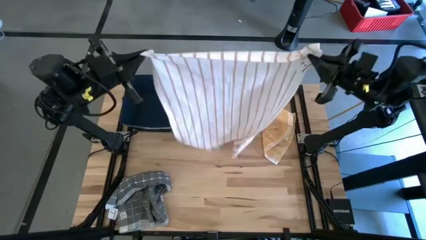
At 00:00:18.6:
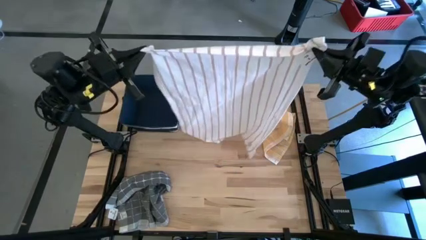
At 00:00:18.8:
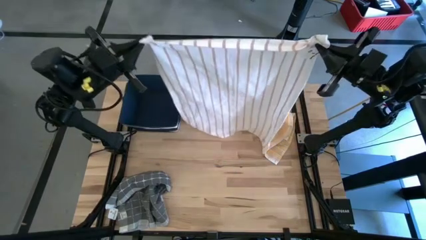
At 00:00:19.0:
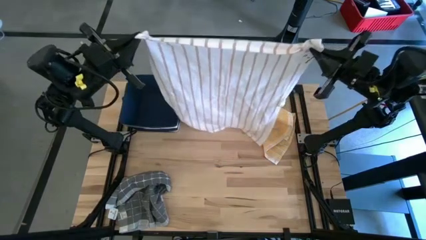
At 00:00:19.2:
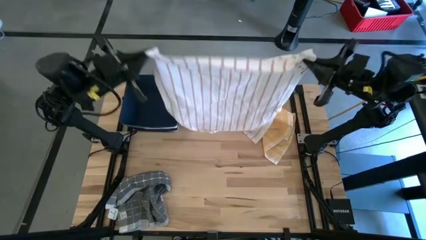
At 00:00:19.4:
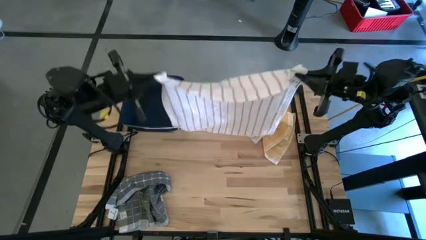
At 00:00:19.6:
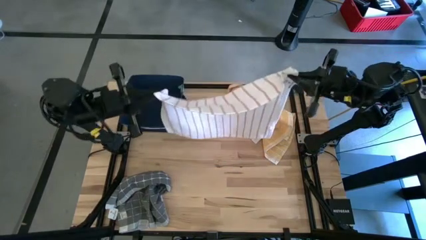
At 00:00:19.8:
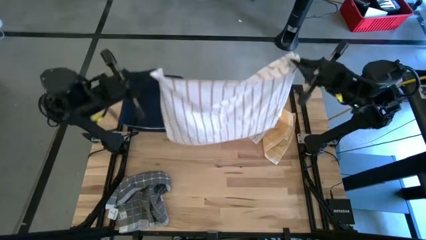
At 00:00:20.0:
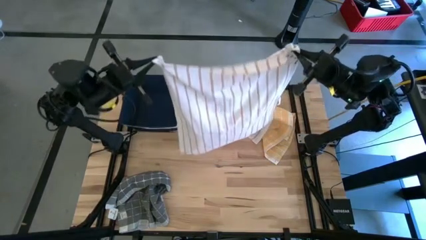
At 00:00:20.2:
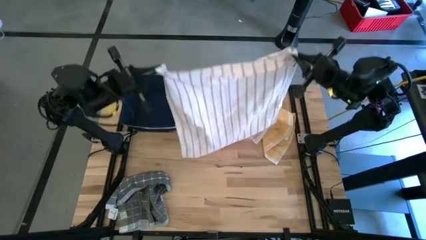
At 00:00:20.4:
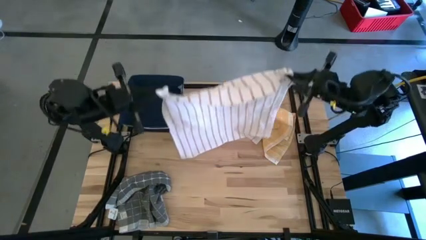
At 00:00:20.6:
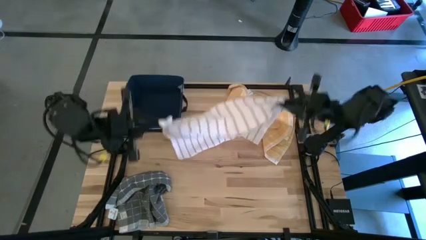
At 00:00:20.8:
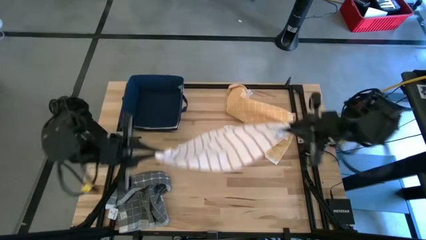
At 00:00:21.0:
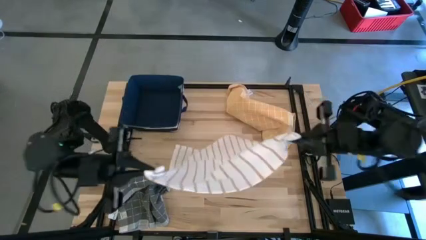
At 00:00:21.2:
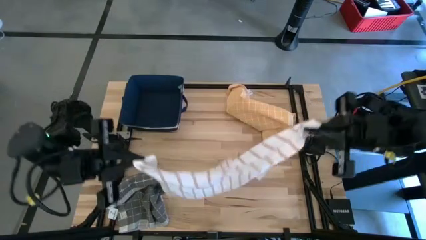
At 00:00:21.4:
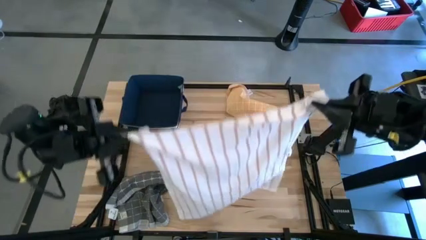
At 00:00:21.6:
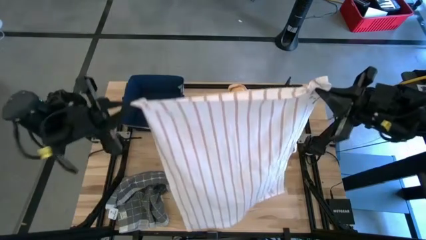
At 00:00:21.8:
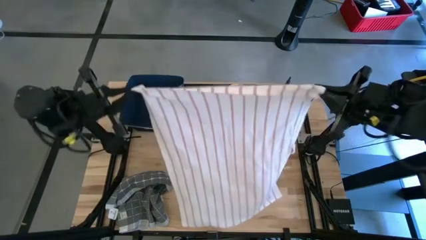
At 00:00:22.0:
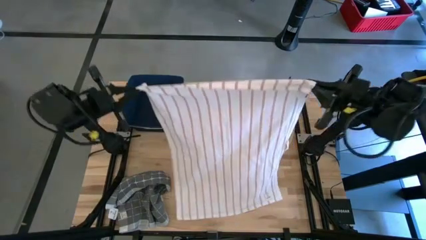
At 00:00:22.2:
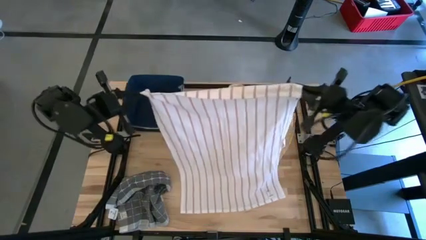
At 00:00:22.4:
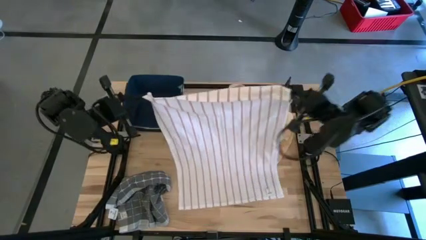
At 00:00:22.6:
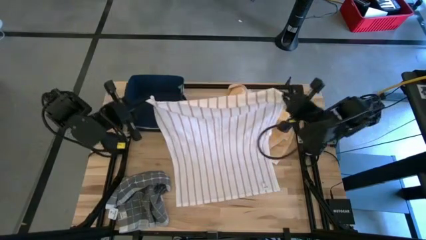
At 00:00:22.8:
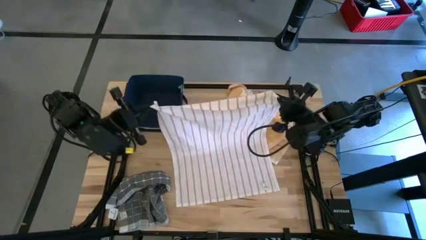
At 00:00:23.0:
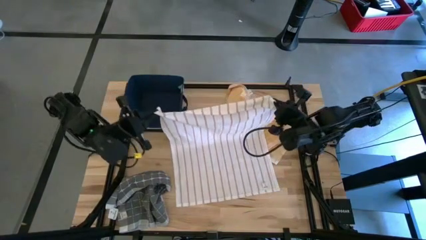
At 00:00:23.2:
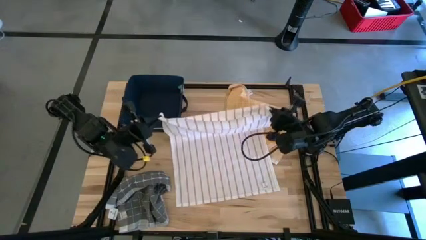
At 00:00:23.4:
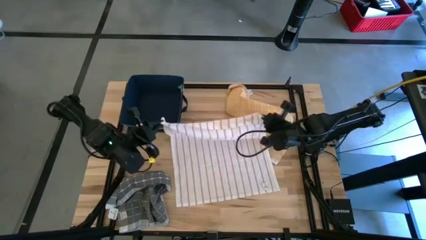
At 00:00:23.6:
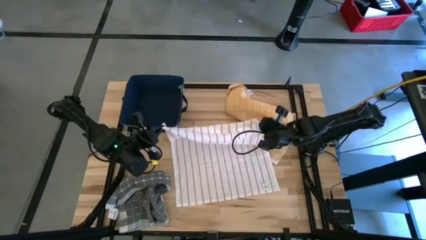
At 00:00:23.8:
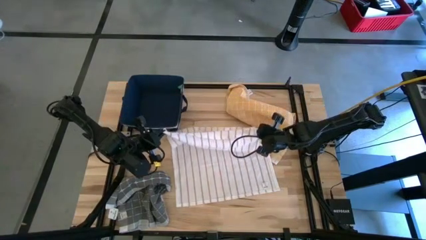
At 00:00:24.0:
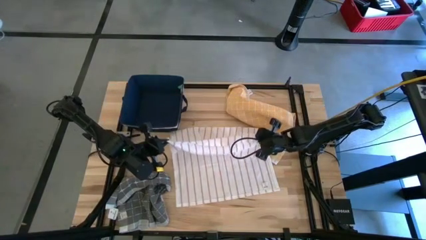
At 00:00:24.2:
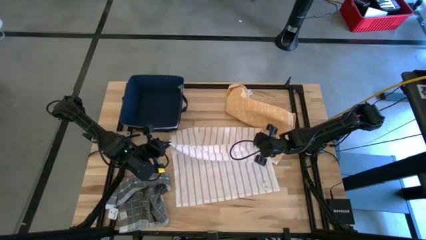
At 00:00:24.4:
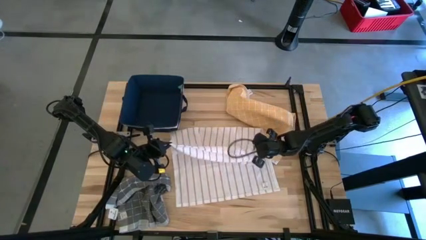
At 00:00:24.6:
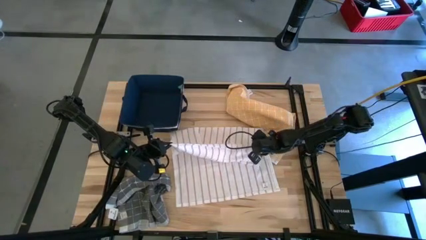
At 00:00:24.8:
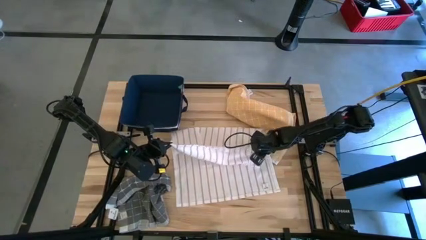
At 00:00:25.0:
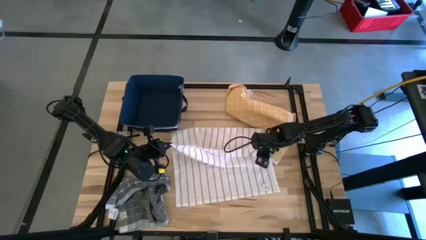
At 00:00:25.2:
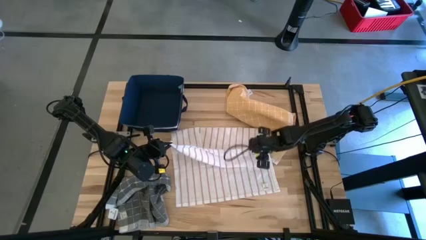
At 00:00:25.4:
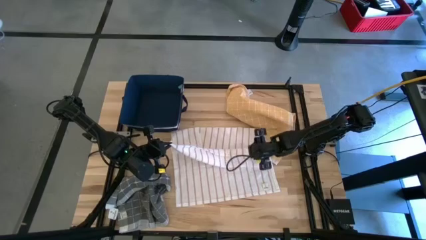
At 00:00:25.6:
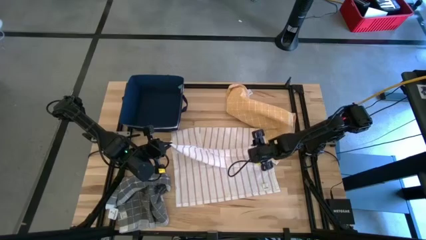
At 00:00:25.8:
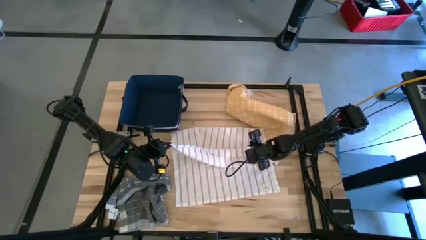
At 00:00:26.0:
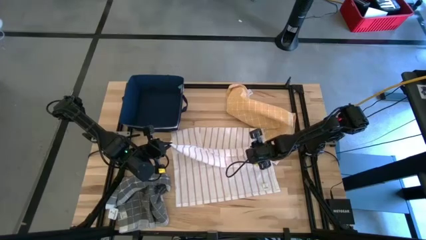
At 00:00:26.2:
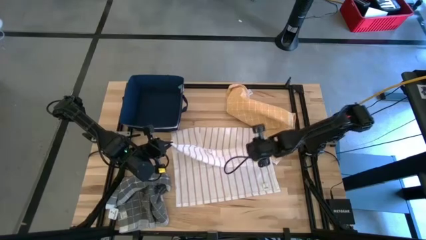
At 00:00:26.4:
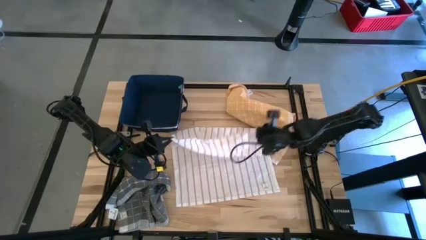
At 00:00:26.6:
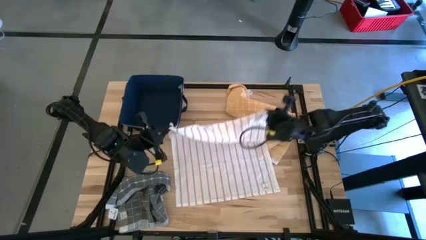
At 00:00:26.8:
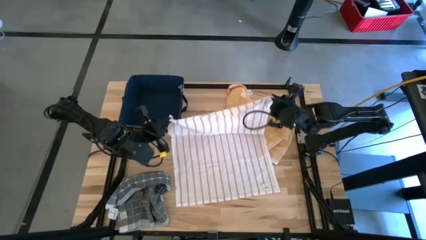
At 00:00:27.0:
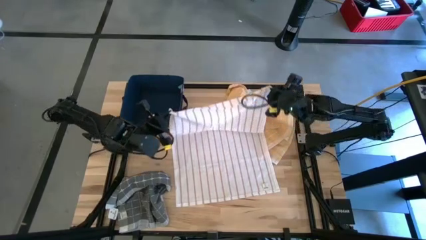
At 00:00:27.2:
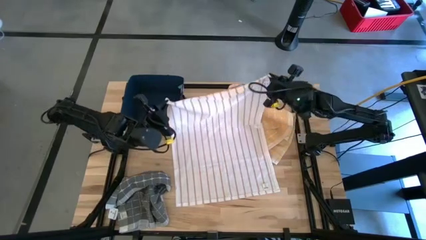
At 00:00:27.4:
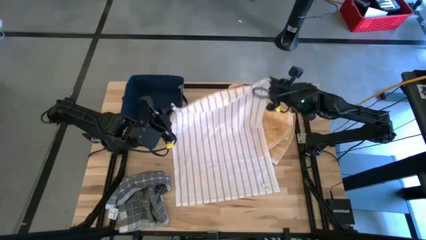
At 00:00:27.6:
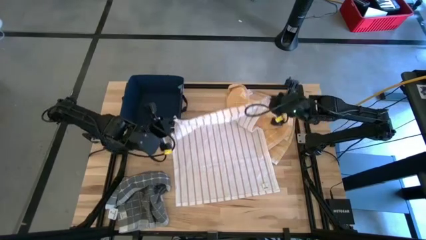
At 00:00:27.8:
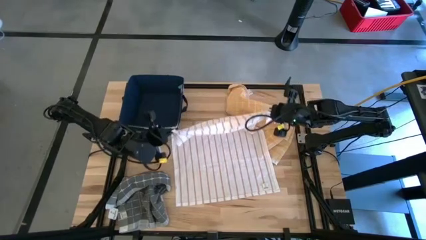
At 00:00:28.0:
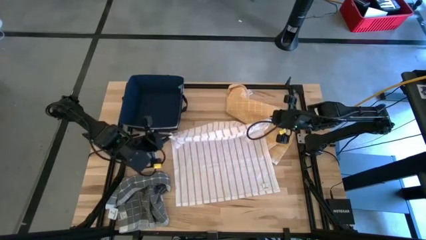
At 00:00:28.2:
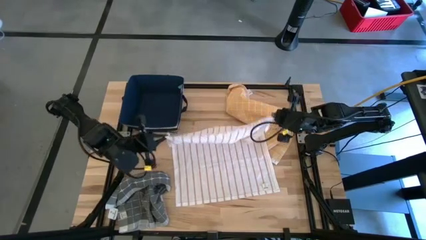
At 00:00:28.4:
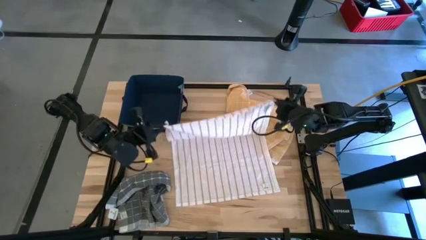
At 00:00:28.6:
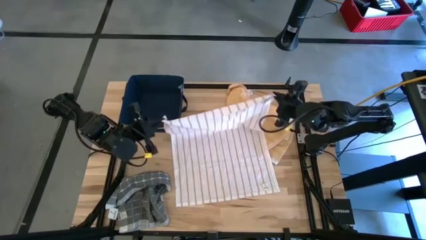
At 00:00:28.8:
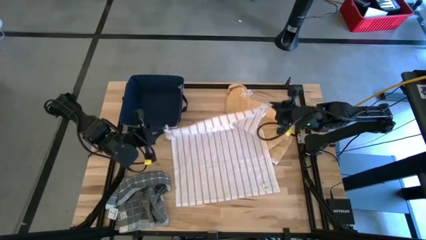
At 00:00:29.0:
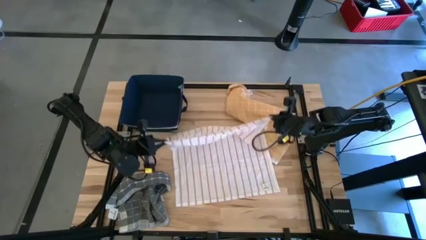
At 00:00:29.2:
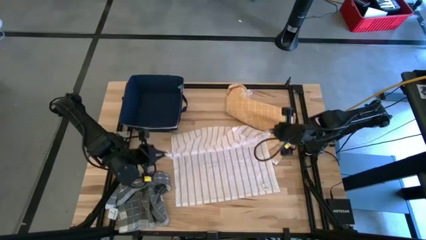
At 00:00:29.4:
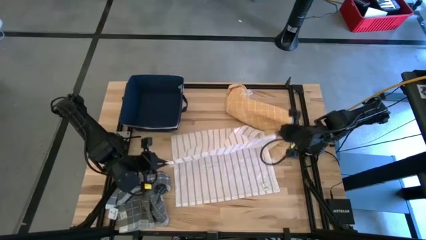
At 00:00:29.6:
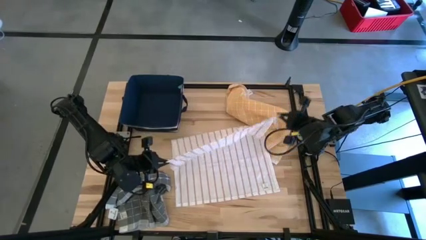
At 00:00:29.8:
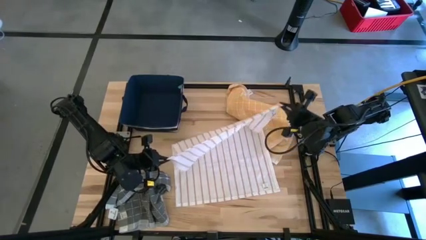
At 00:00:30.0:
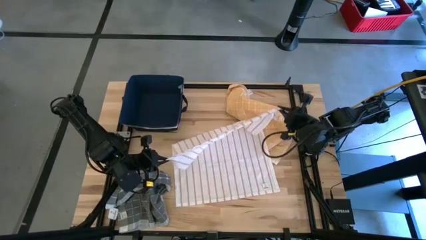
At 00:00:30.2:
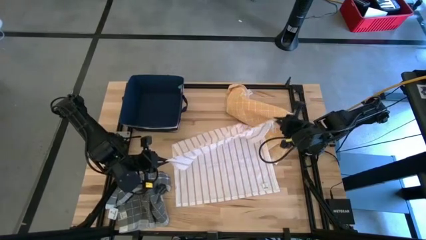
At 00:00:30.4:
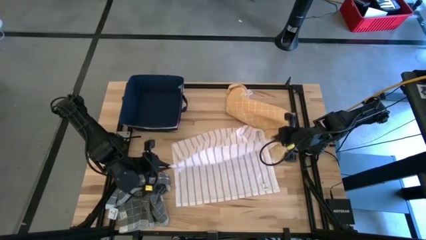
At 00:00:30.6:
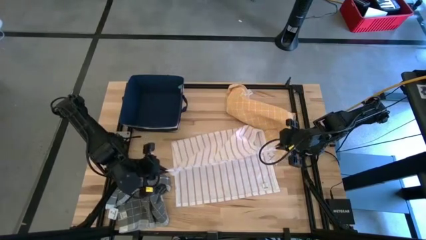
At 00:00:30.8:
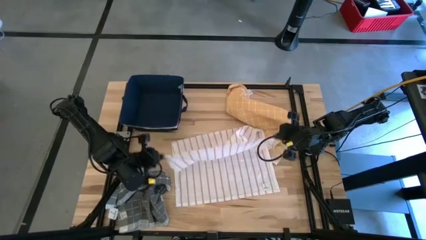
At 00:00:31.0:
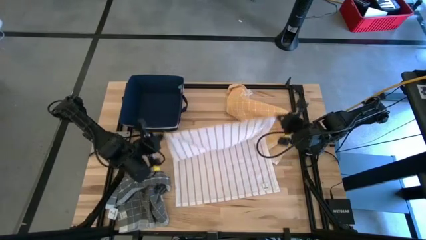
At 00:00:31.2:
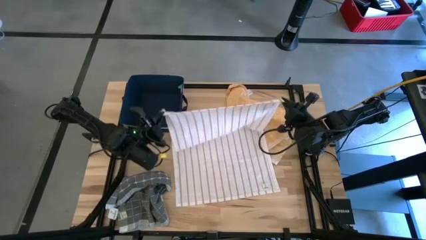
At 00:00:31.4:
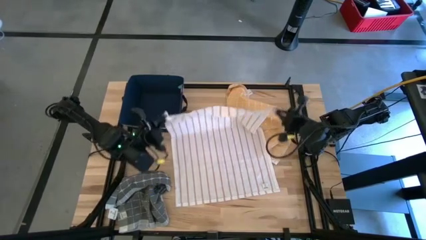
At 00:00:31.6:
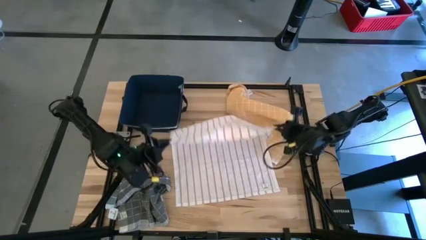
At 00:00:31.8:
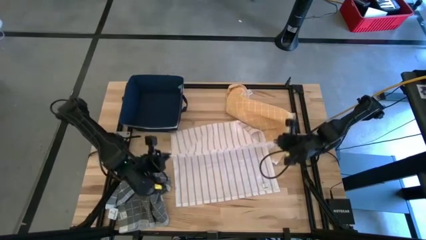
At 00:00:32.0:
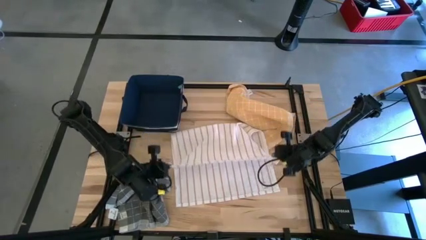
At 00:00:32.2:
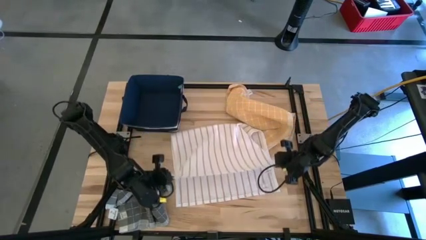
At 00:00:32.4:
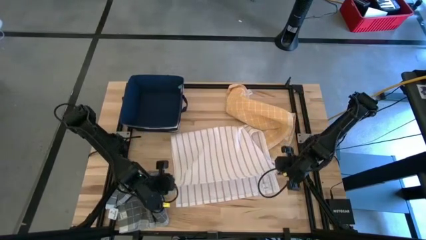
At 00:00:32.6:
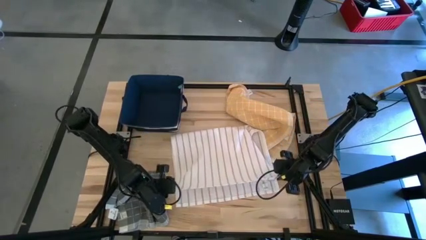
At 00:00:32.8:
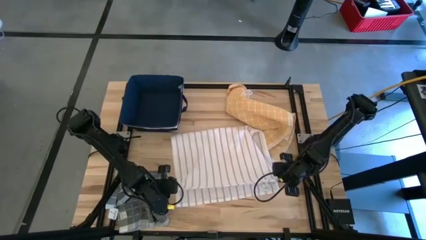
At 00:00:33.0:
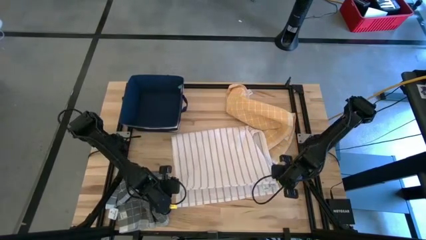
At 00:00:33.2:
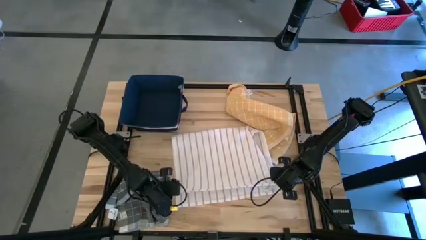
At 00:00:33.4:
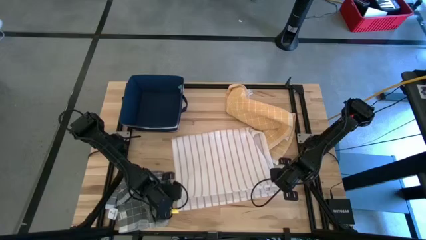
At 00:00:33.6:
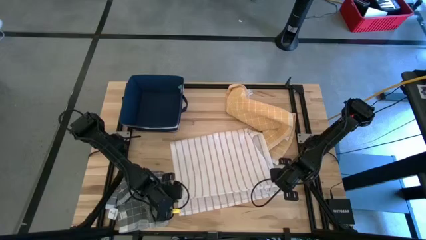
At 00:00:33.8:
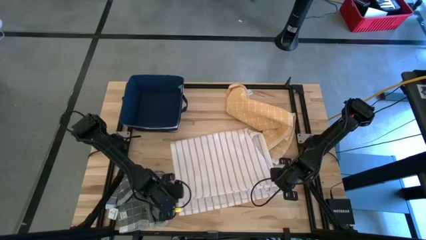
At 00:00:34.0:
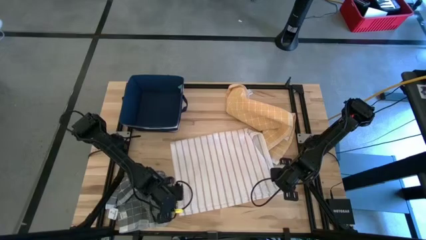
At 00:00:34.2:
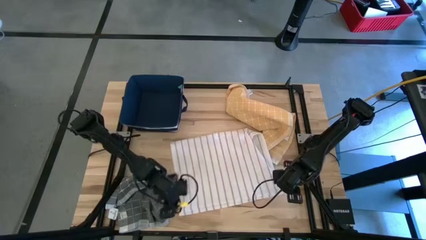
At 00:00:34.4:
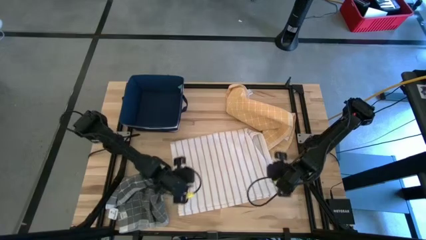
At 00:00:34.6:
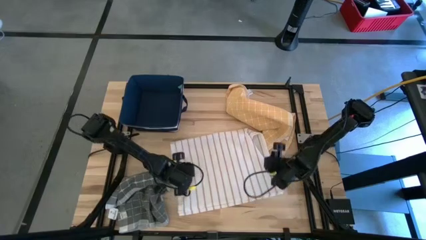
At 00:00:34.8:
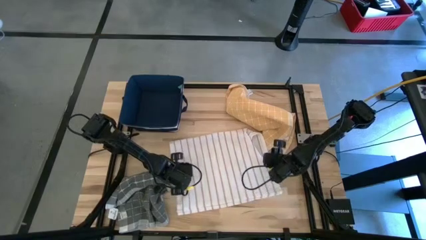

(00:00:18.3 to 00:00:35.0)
Task: Fold towel
Fold the white towel
